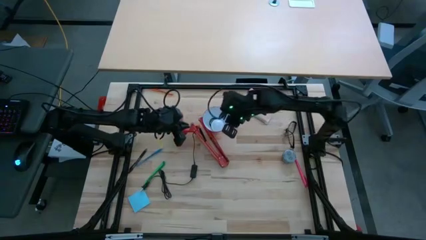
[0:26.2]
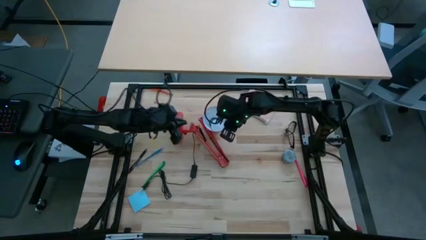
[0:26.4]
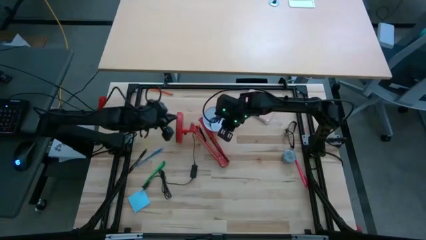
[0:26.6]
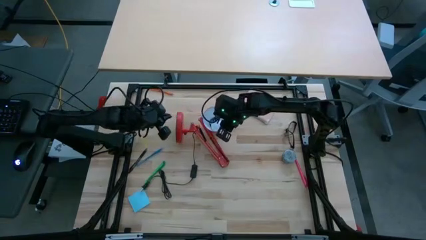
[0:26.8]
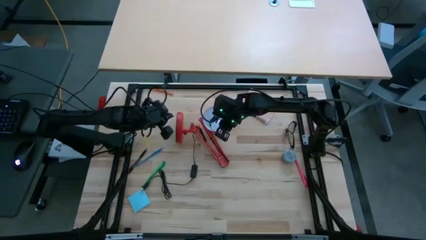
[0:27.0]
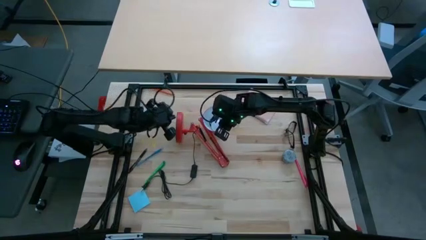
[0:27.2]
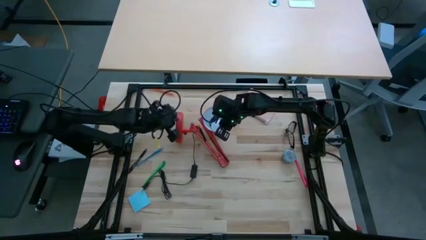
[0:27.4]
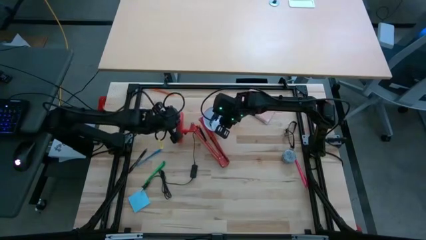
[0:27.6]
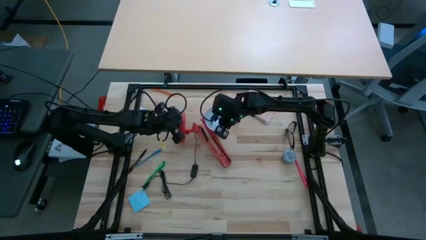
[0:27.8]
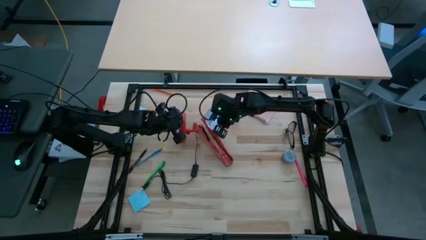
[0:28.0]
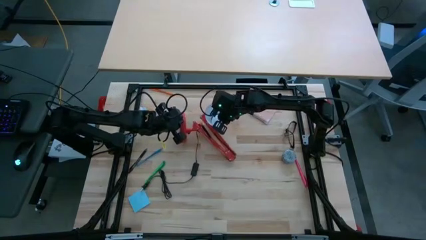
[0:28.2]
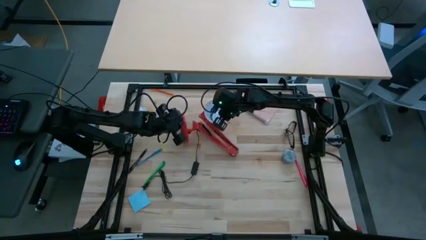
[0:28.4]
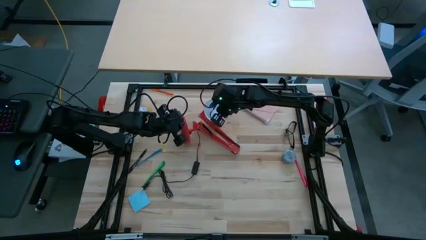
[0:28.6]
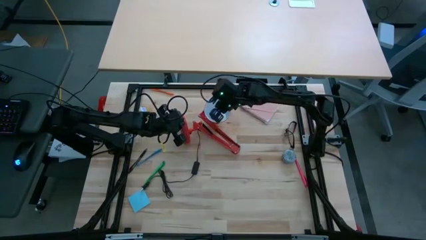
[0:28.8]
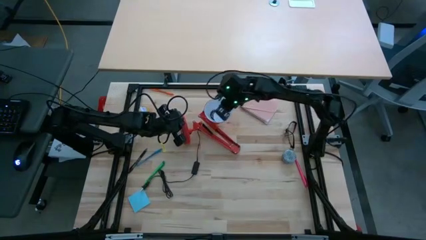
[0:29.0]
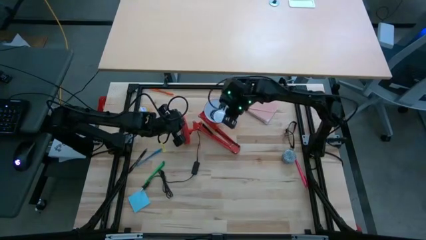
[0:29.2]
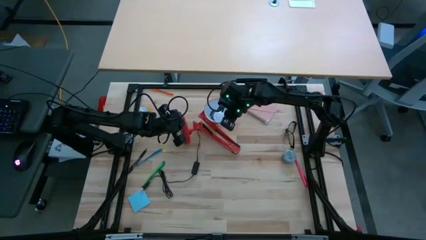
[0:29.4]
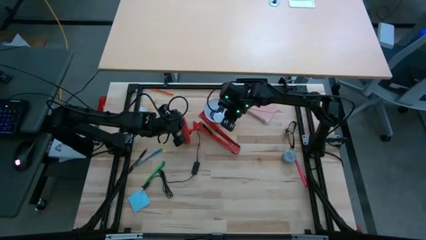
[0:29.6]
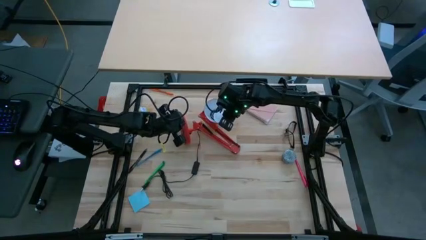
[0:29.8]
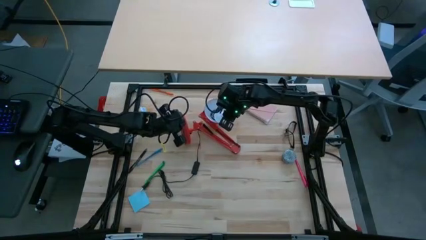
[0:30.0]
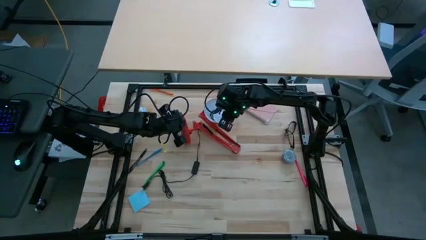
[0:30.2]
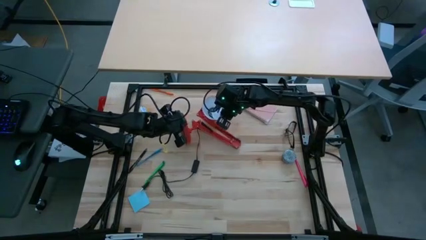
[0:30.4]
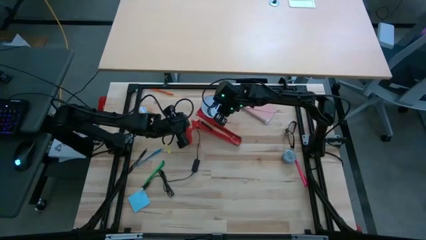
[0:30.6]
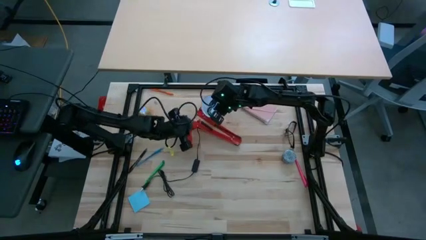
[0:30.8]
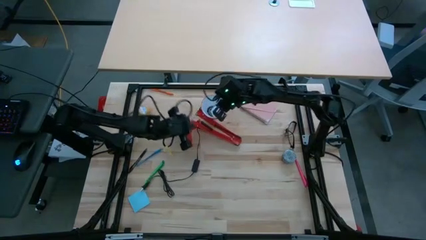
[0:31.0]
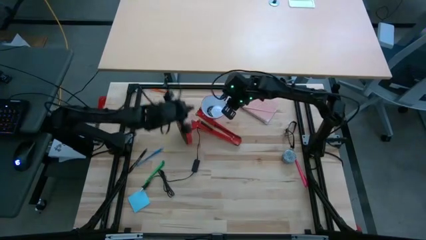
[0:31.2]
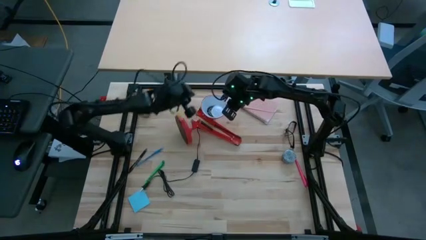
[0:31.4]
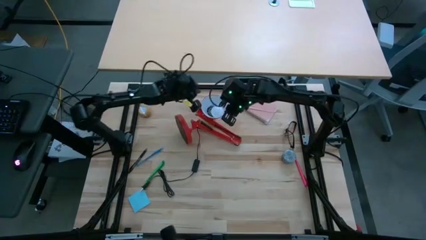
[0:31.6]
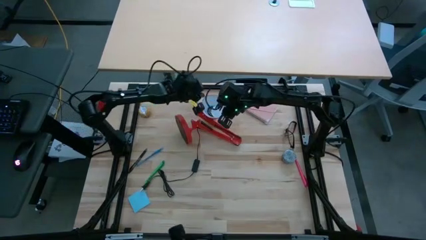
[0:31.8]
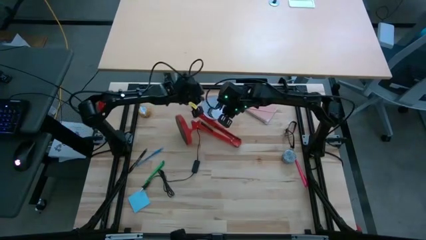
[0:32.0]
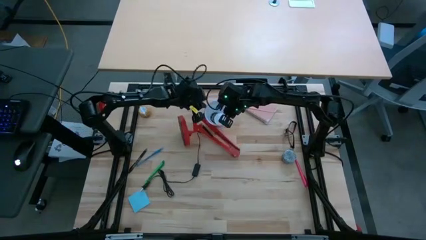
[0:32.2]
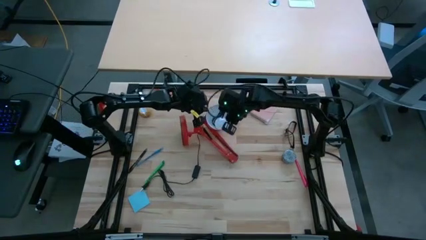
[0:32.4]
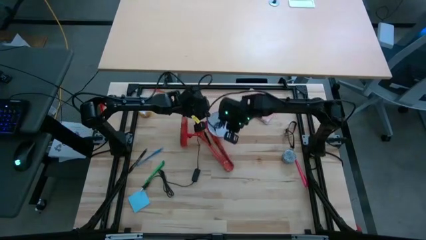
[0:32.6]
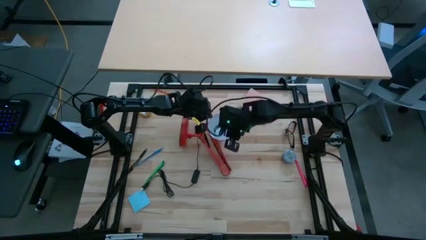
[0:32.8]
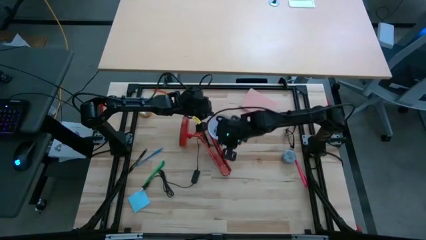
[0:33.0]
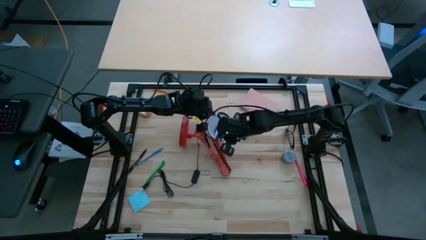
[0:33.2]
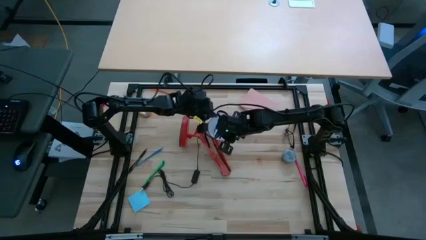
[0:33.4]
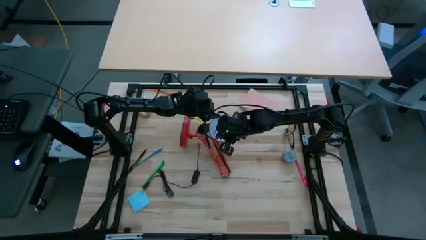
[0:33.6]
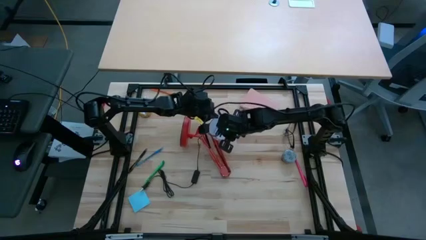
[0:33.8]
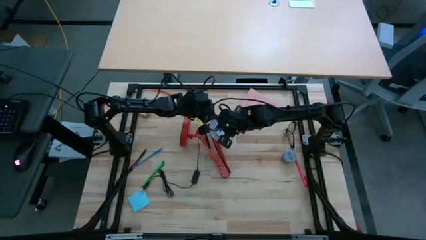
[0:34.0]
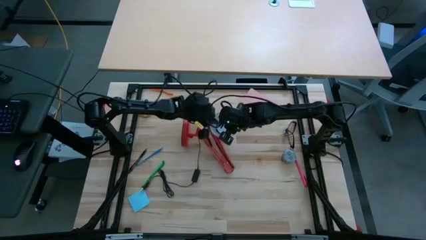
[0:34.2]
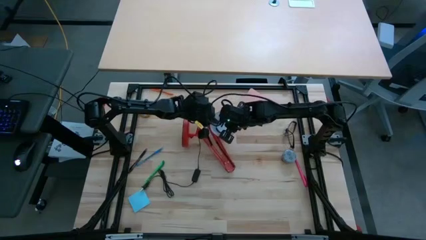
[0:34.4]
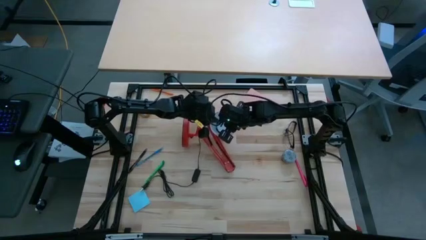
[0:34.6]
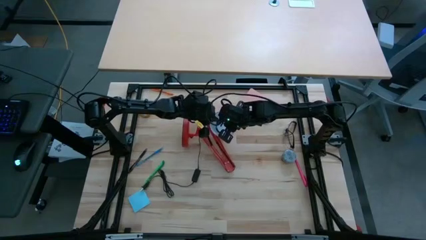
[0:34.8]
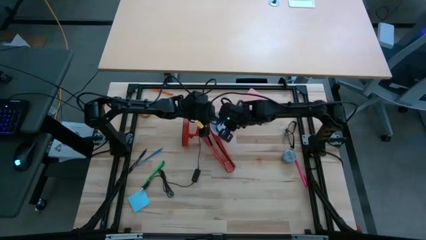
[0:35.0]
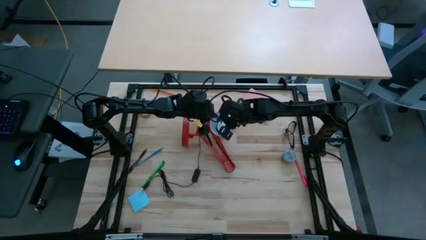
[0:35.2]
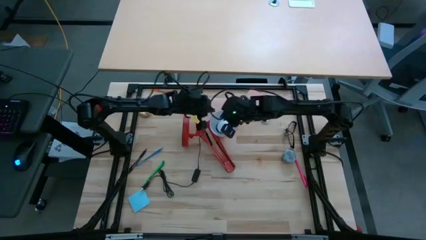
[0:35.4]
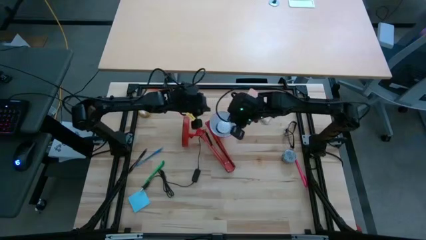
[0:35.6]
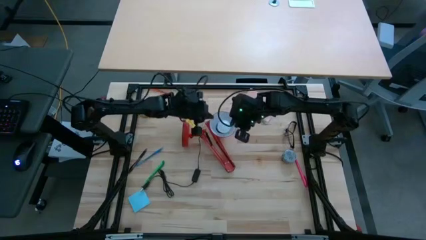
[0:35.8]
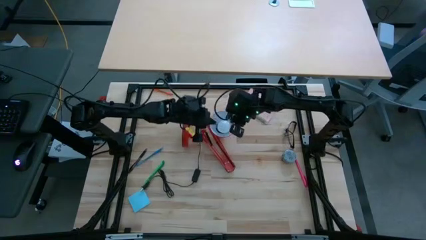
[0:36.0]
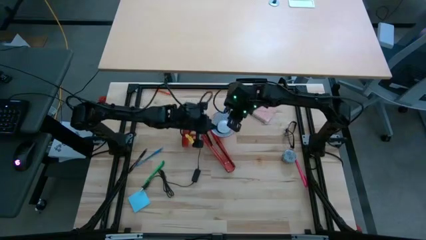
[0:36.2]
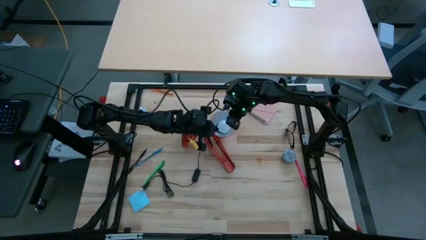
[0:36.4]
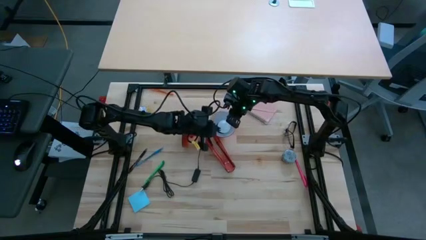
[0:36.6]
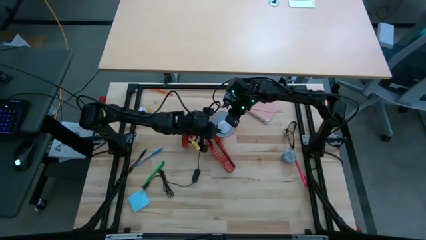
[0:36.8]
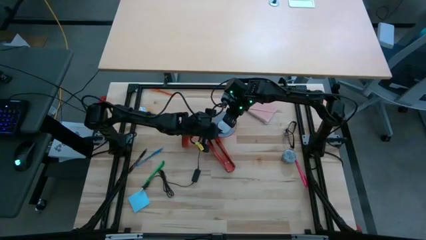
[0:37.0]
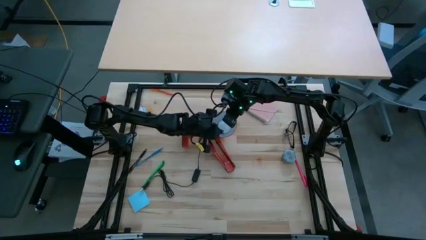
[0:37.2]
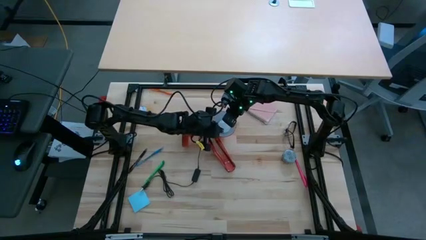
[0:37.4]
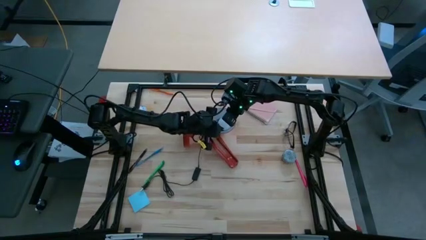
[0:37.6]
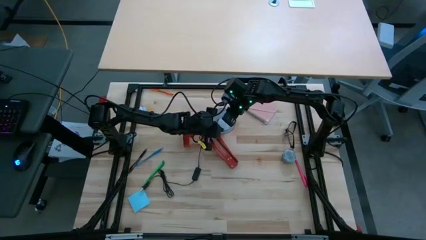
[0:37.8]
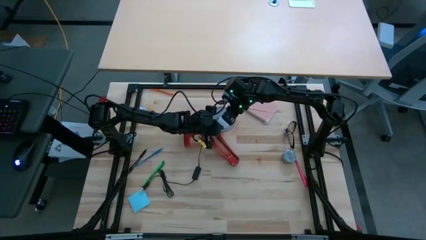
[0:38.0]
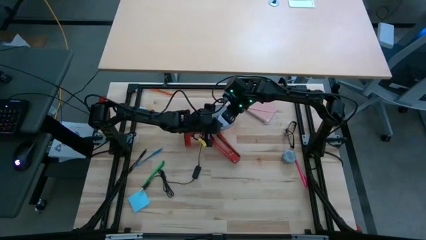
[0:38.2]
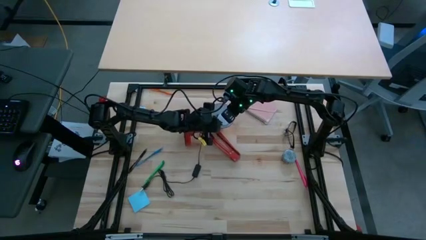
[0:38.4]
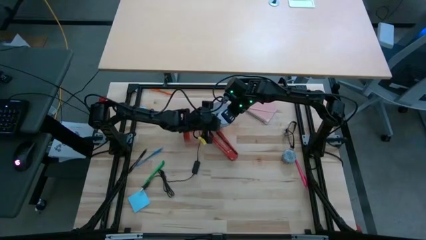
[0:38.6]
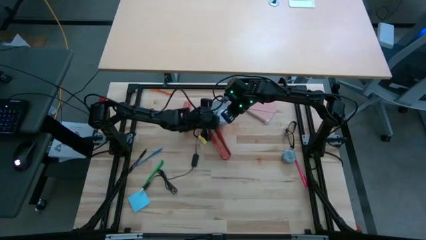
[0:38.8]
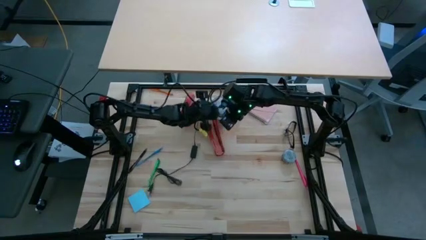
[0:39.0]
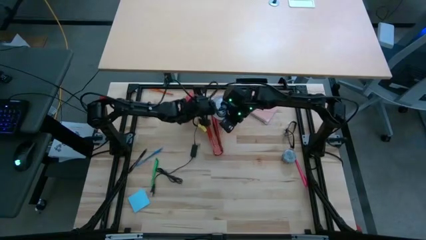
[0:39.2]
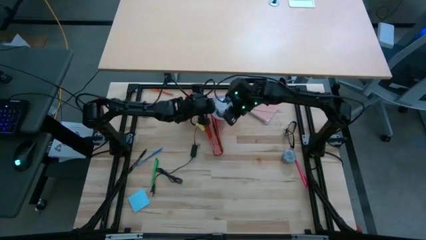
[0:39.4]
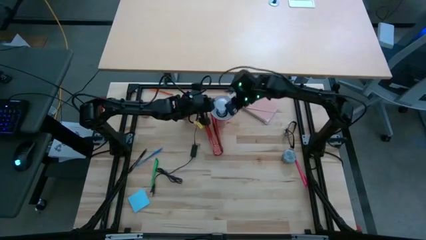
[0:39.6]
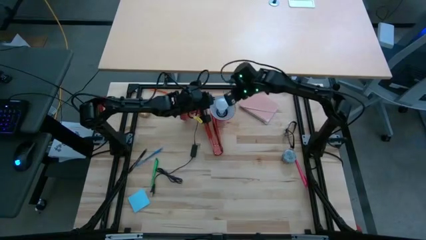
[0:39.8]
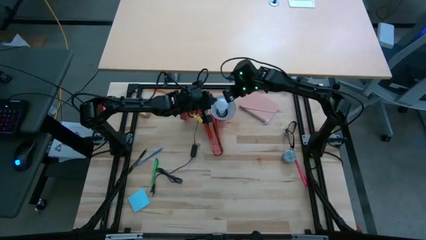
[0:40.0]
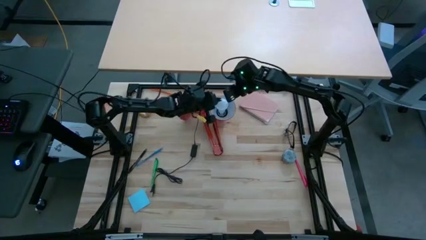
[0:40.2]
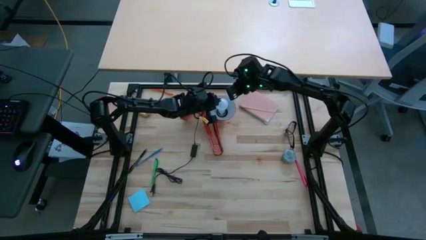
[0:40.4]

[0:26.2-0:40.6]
Task: Screw lightbulb
Insert the white lightbulb into the red lamp
